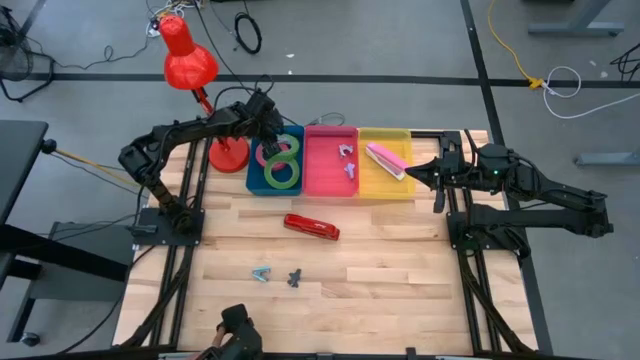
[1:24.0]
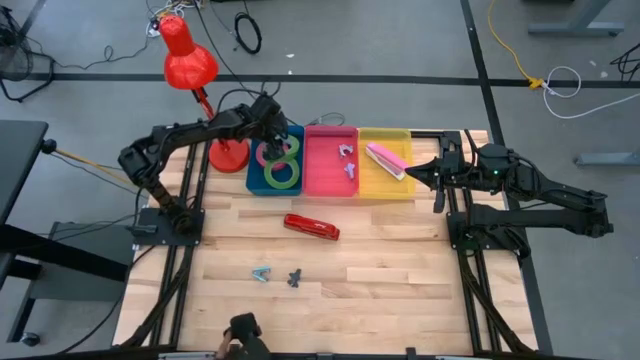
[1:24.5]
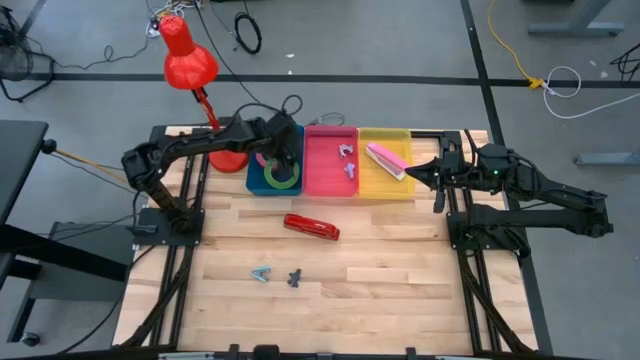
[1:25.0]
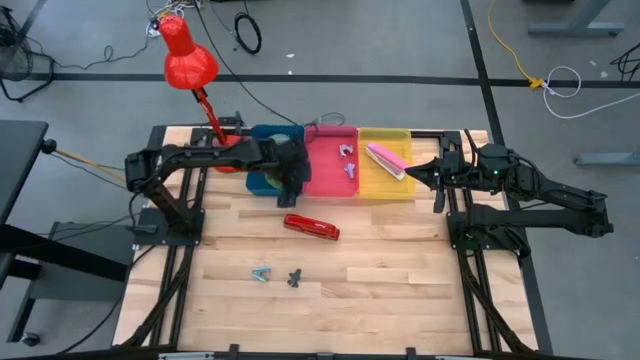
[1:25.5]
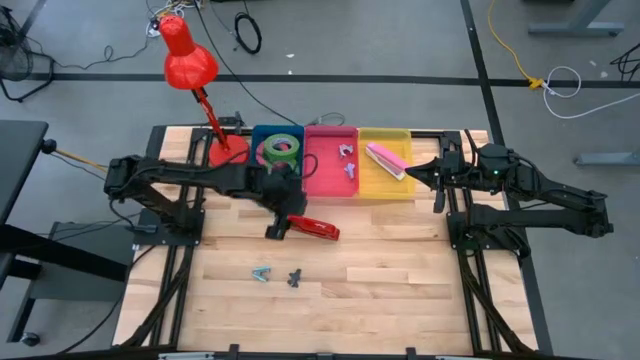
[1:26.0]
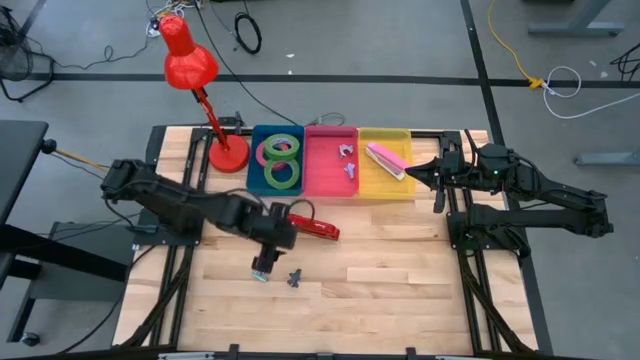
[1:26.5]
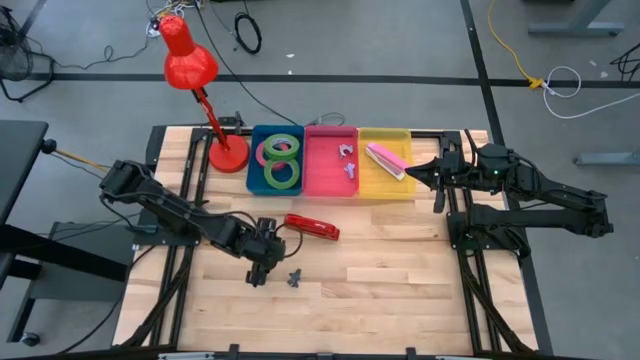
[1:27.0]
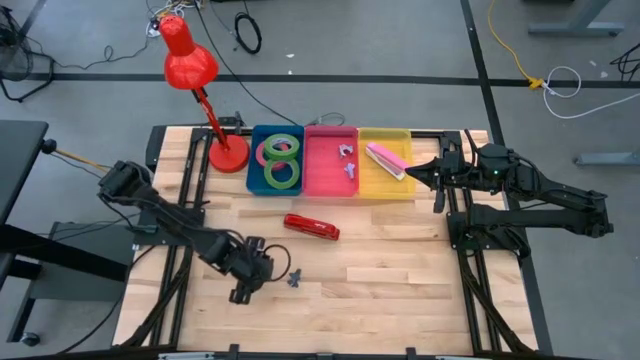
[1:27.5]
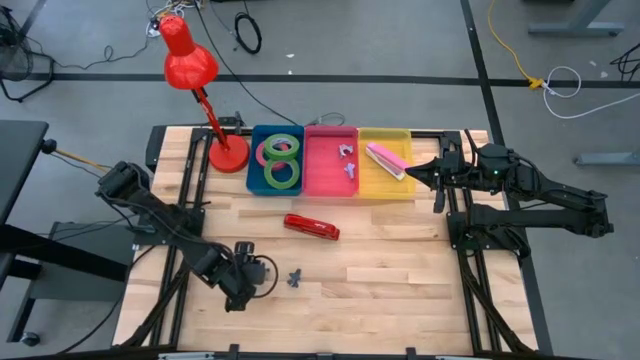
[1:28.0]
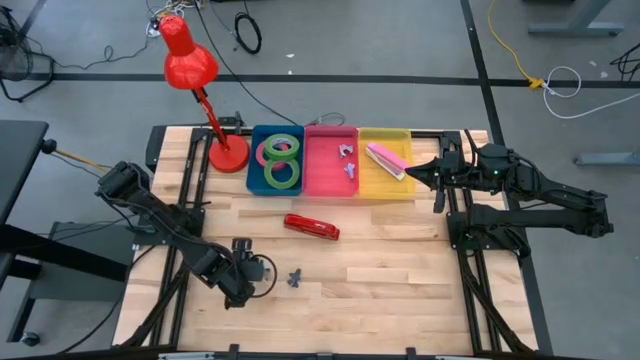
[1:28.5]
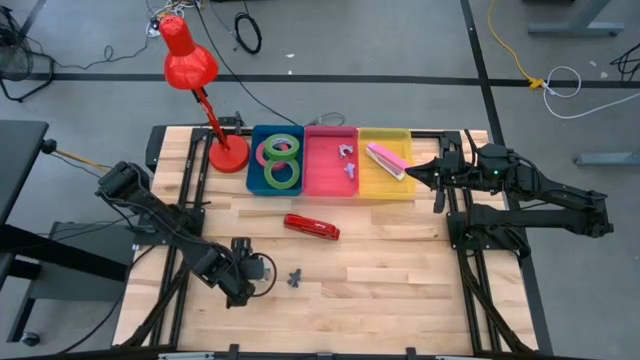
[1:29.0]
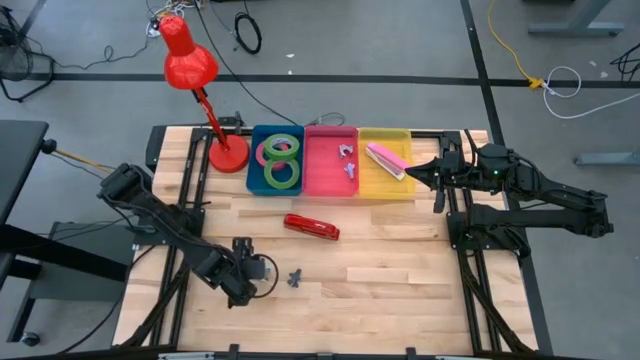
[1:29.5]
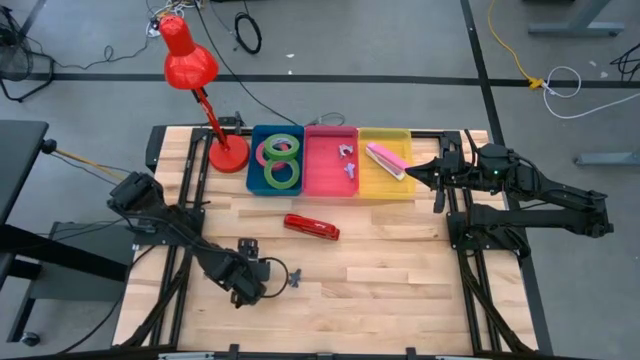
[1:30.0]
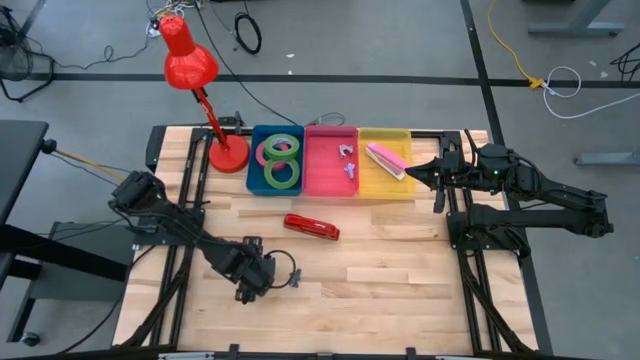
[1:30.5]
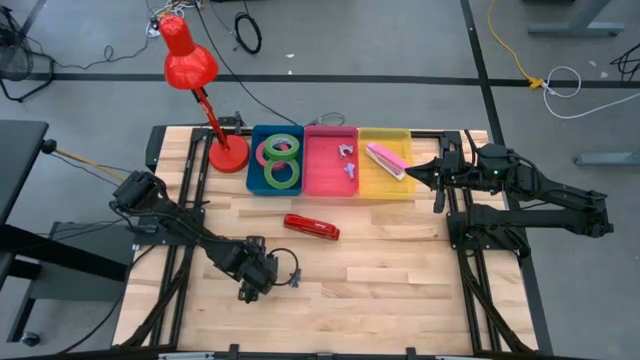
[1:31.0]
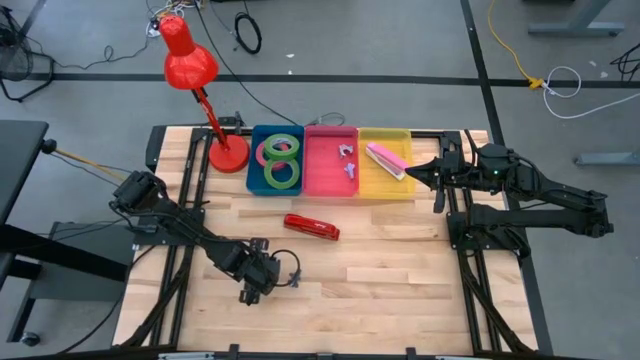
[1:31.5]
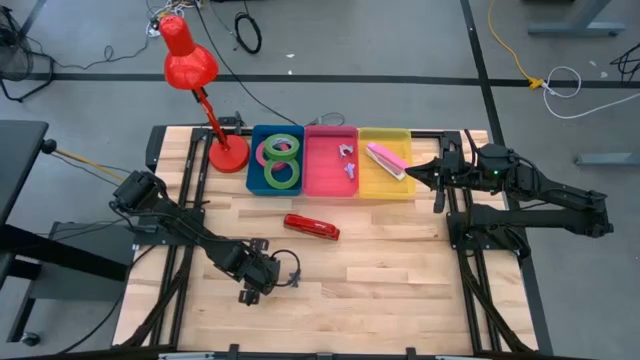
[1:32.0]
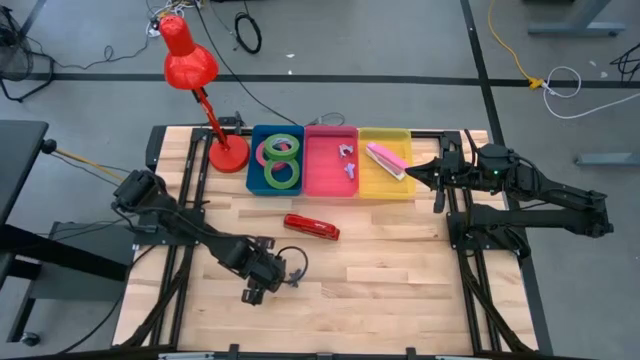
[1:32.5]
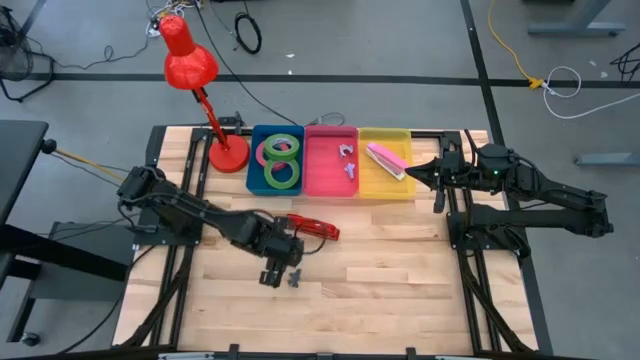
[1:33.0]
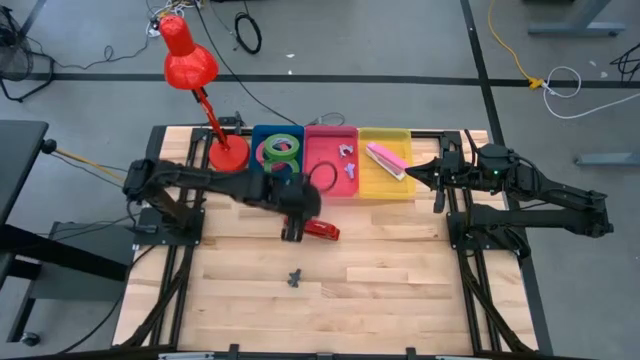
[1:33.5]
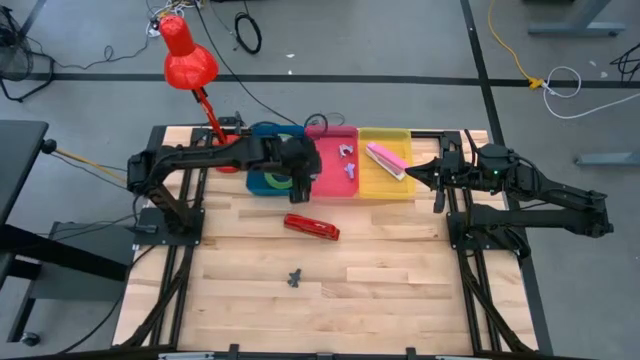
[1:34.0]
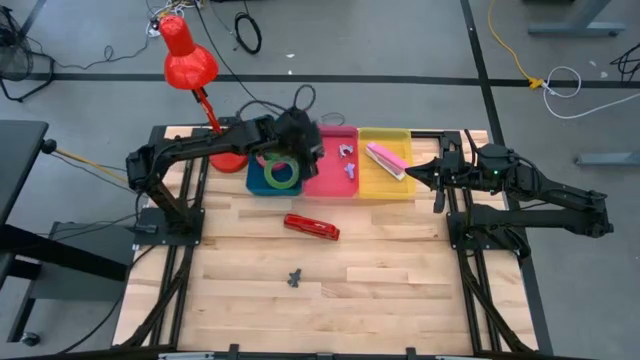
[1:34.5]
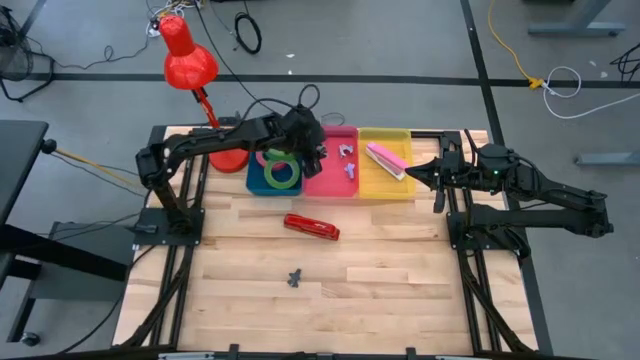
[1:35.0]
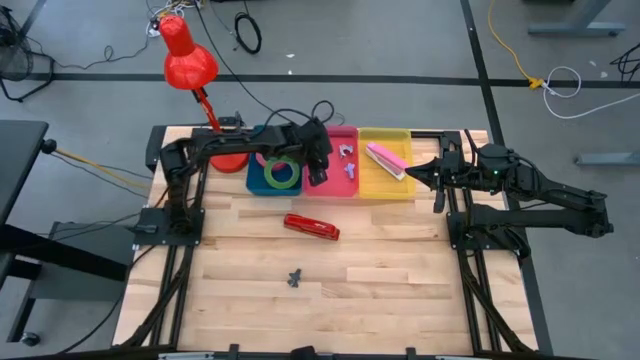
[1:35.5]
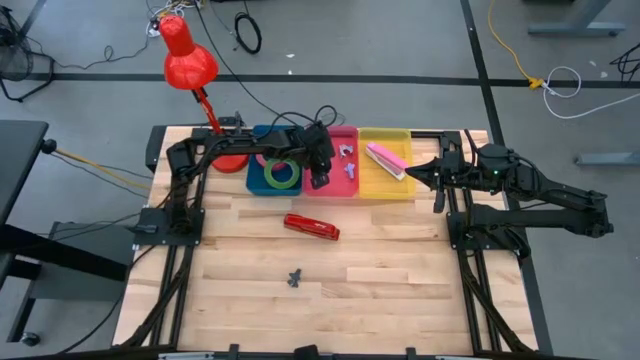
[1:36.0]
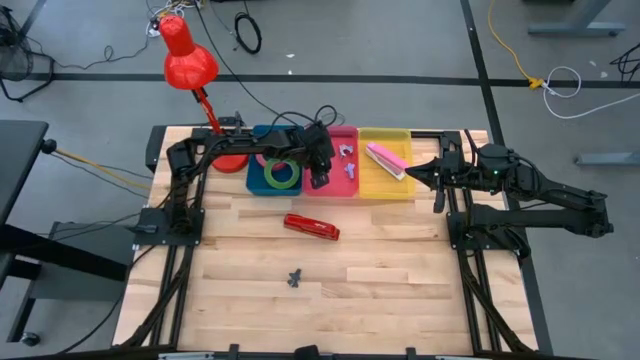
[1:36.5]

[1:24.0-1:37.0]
Task: Pick and place Stapler, Stapler remover, tape
Put the light blue staple remover into the red bin

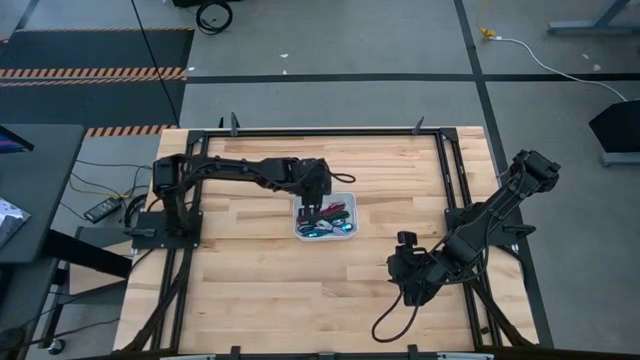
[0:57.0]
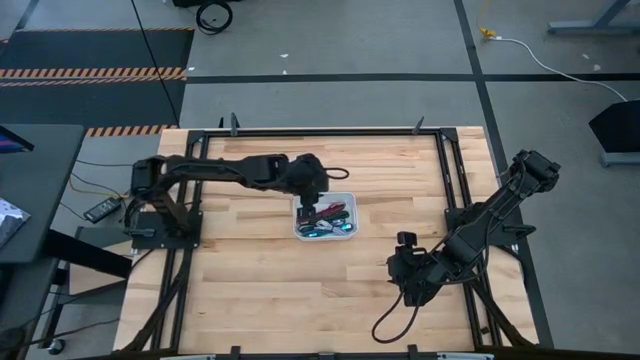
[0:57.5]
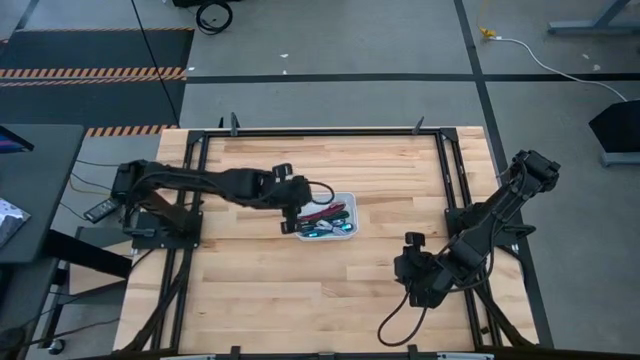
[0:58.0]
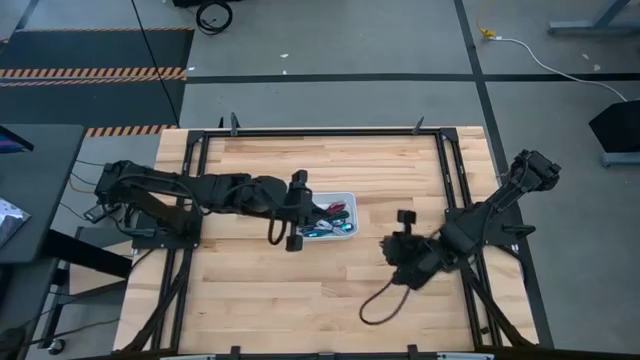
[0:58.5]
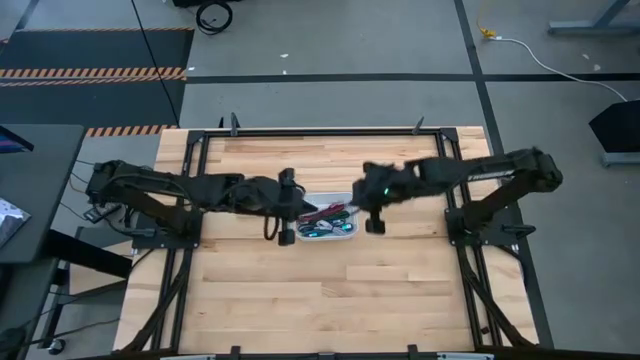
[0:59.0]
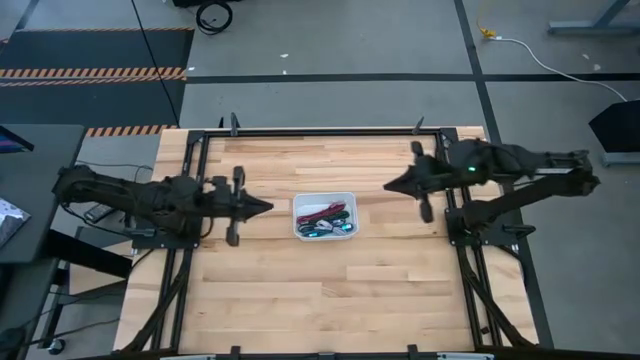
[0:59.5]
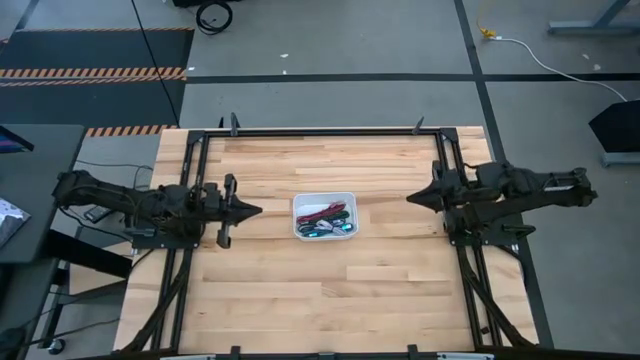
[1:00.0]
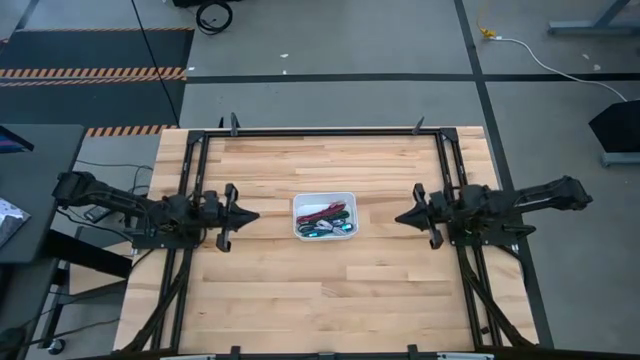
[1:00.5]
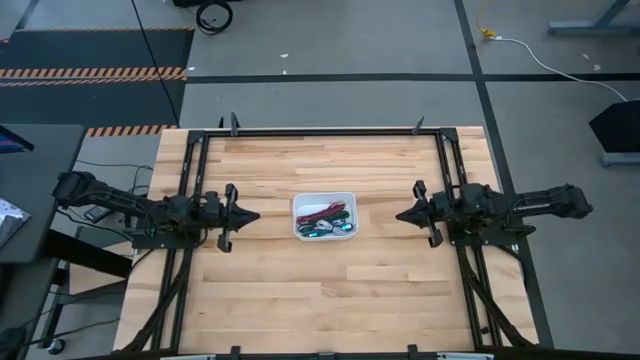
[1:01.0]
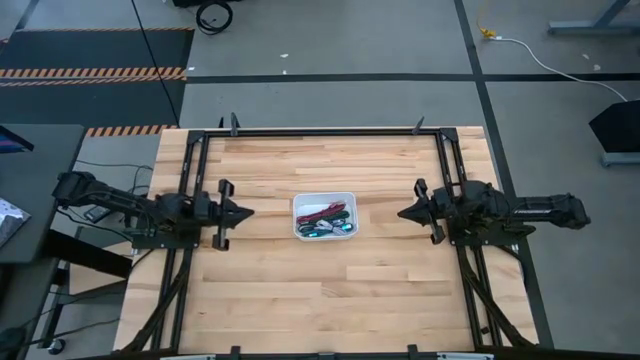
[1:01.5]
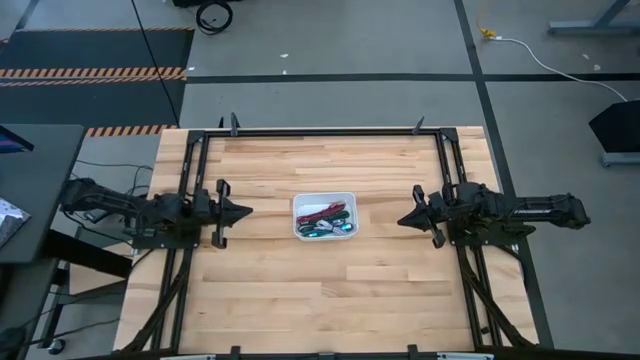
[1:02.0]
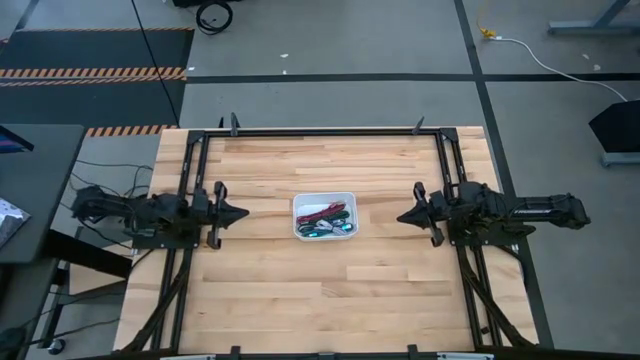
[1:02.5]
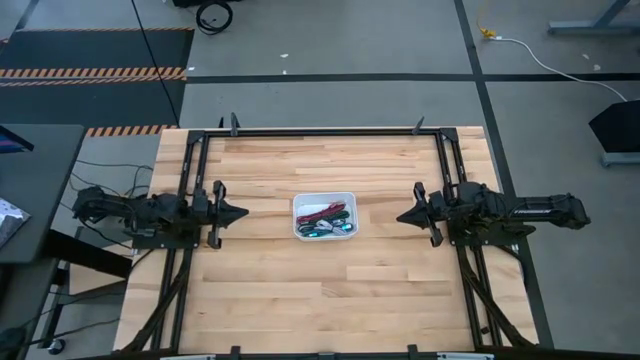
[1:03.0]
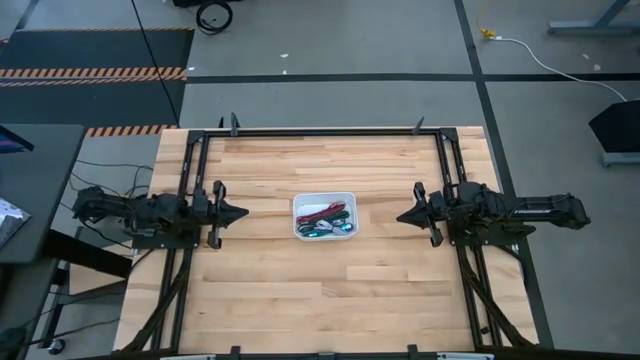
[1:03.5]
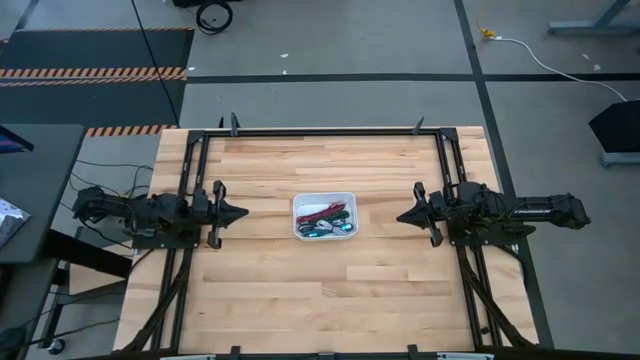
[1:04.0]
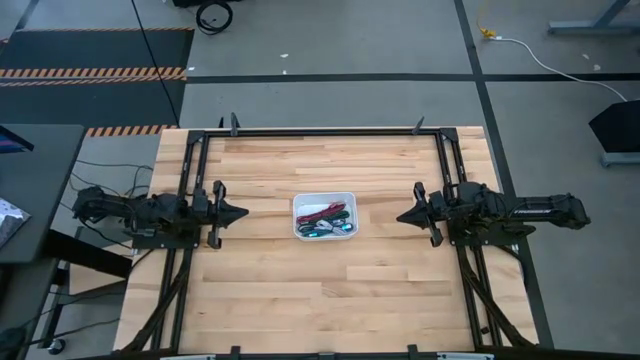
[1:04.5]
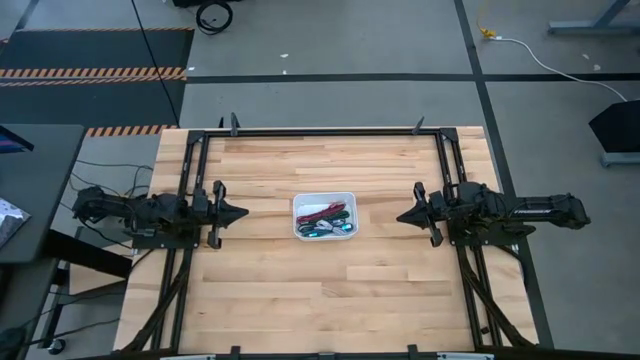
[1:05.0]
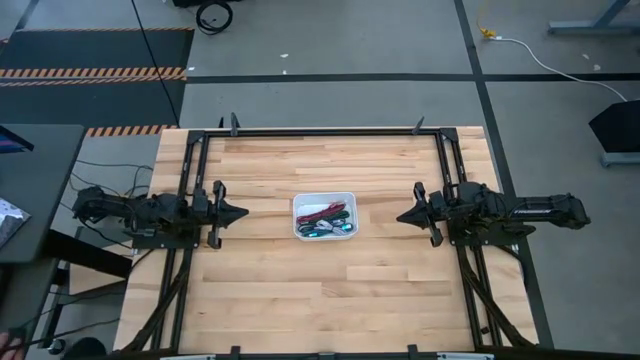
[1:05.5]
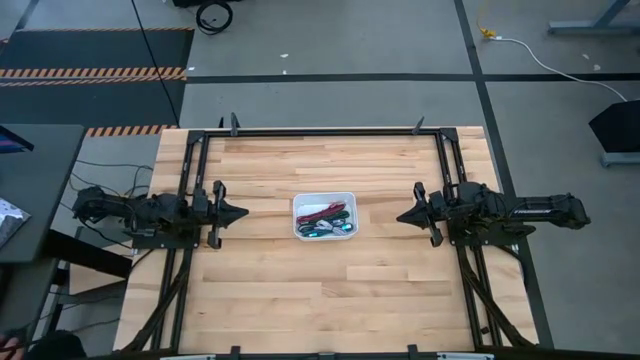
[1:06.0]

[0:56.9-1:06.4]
Task: Pick and place USB-C Cables
Return to Home Position
